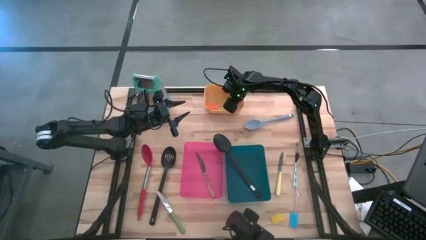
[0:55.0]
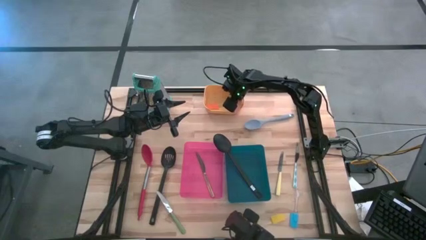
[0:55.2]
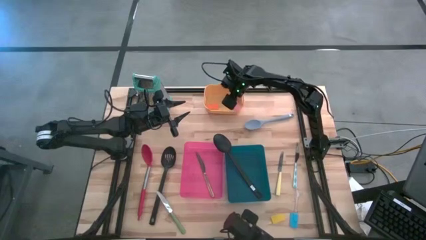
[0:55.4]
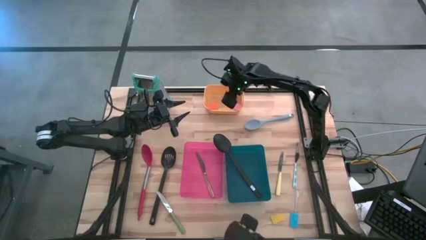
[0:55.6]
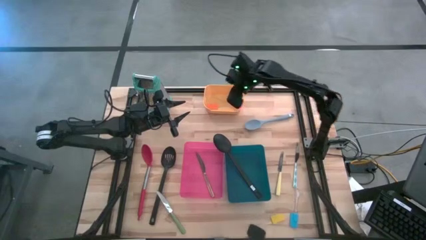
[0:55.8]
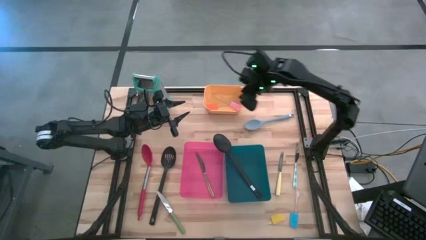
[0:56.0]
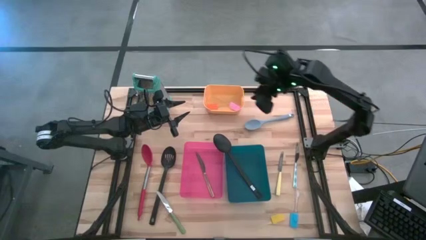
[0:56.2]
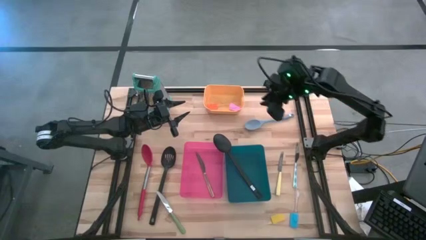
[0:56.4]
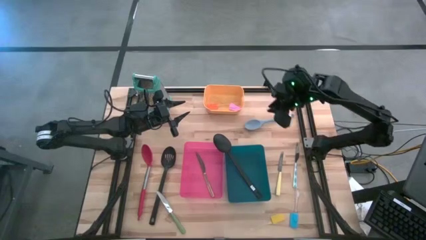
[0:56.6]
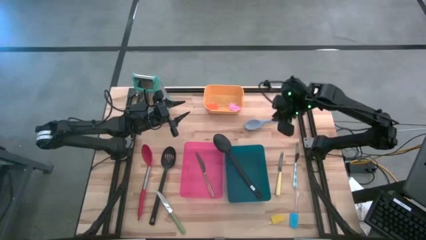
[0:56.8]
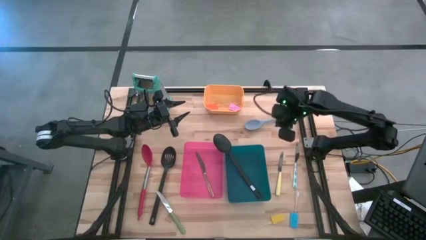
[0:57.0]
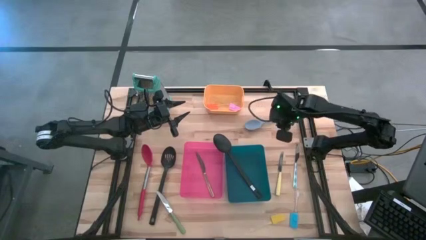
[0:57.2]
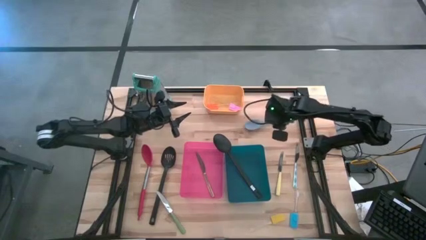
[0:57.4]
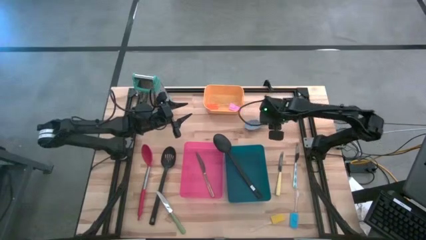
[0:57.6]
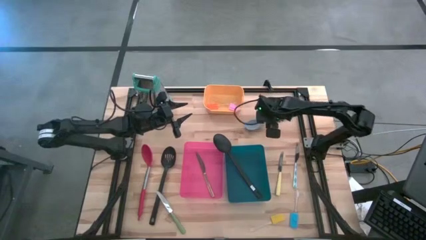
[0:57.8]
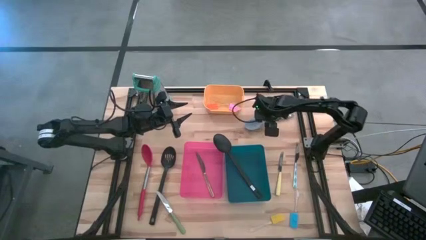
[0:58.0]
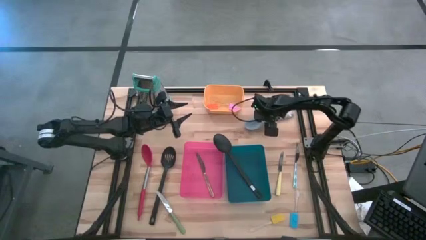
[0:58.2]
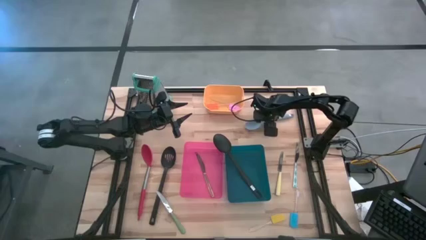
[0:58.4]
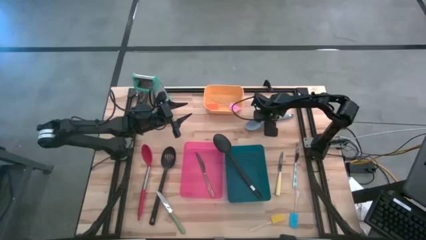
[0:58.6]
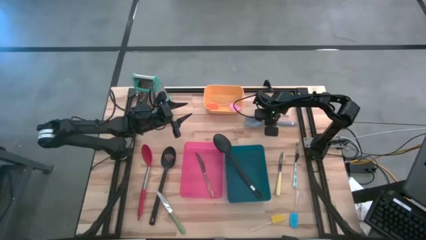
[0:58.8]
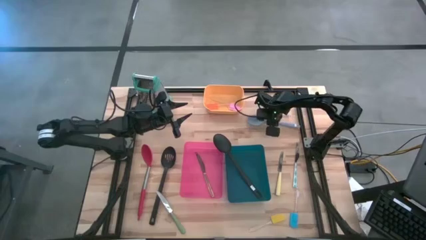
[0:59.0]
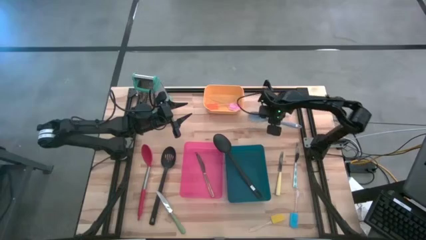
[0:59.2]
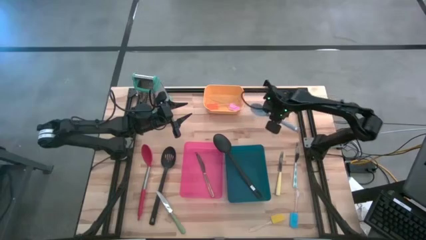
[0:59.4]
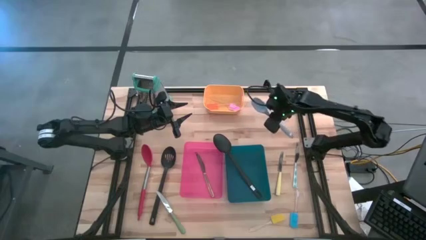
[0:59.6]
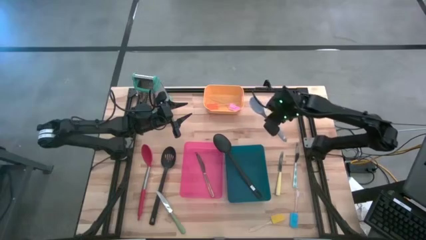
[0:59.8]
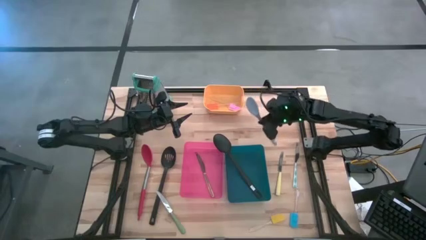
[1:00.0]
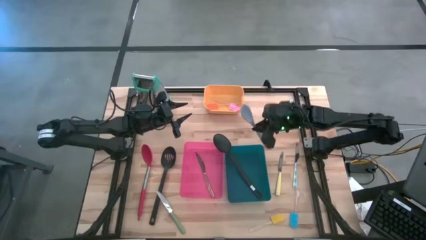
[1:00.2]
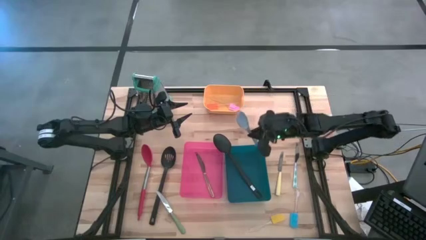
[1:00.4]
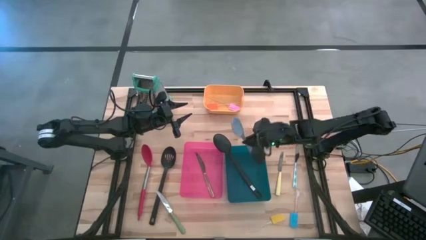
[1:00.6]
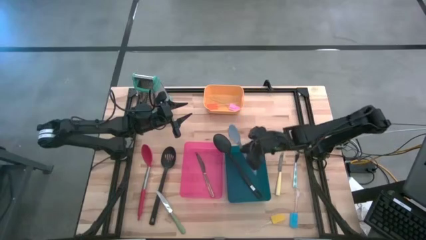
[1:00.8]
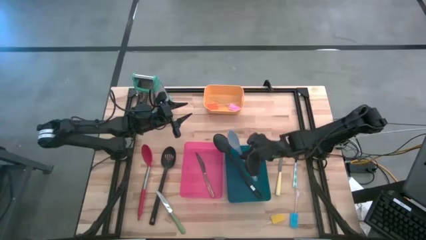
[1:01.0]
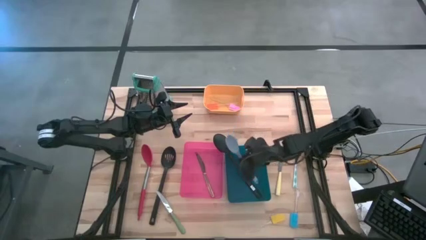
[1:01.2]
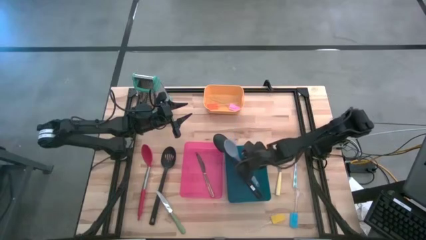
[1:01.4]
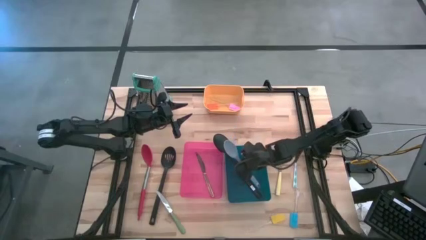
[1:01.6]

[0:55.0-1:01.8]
Task: Pick & Place Kitchen Items
Put the gray spoon into the blue bin

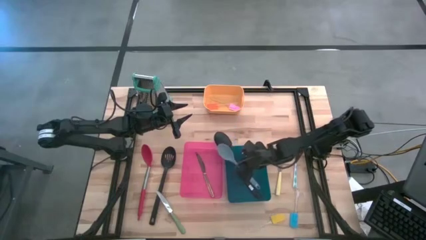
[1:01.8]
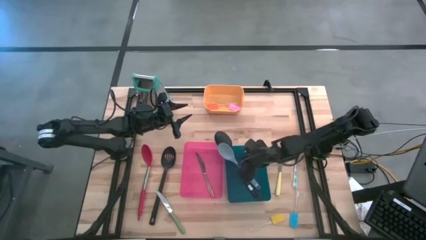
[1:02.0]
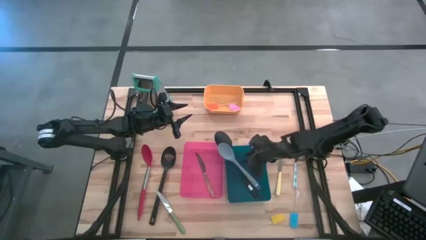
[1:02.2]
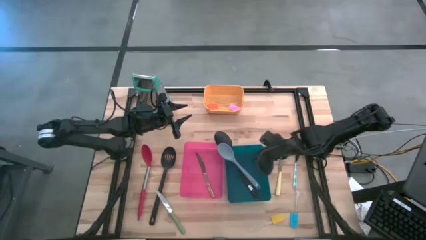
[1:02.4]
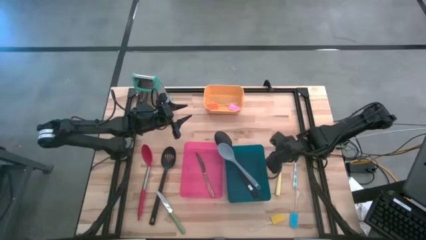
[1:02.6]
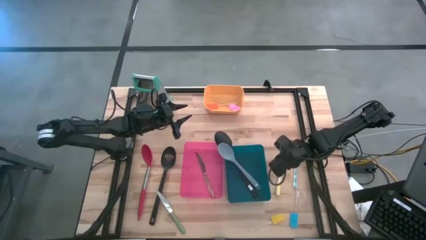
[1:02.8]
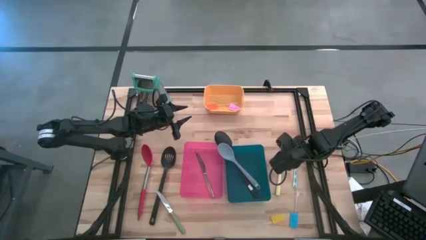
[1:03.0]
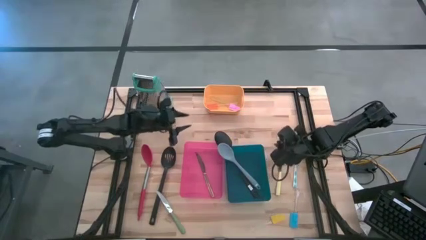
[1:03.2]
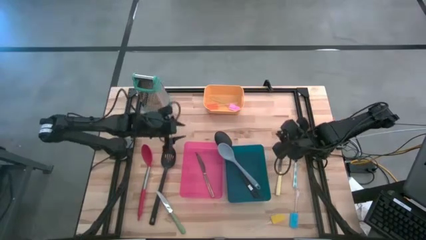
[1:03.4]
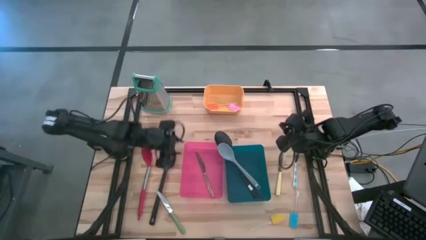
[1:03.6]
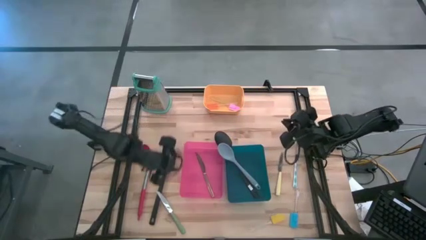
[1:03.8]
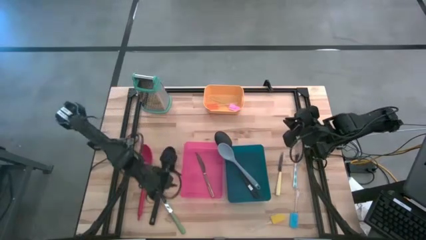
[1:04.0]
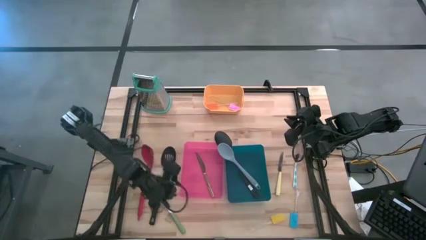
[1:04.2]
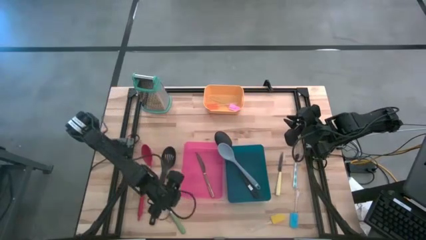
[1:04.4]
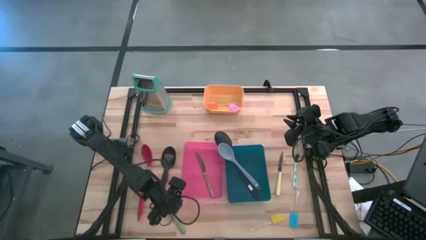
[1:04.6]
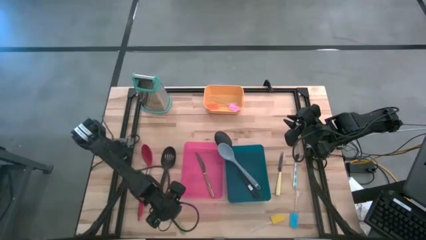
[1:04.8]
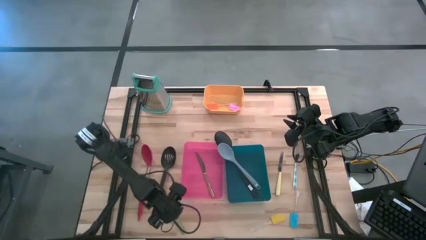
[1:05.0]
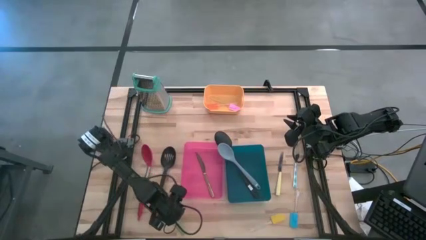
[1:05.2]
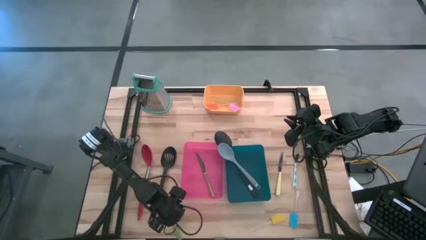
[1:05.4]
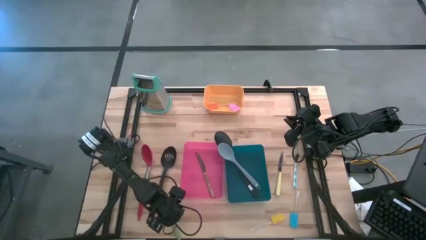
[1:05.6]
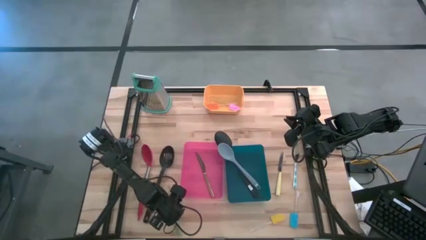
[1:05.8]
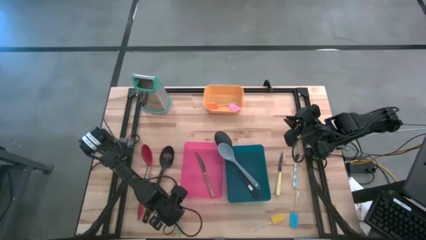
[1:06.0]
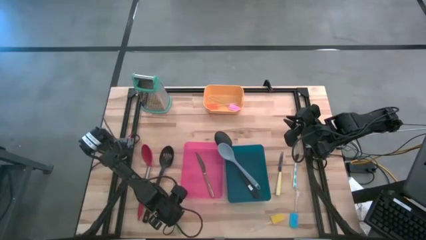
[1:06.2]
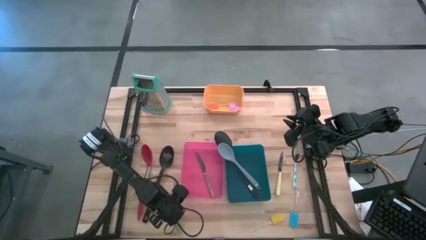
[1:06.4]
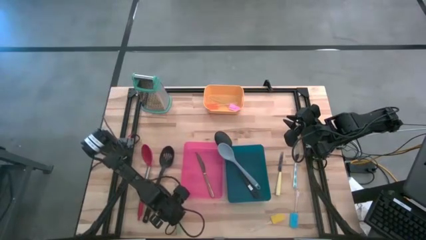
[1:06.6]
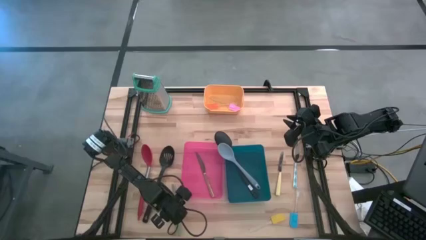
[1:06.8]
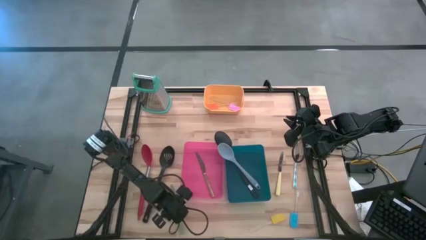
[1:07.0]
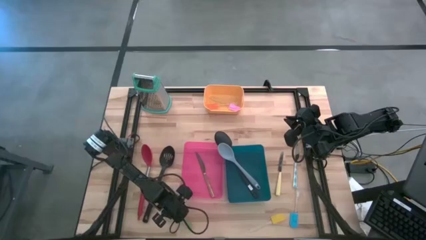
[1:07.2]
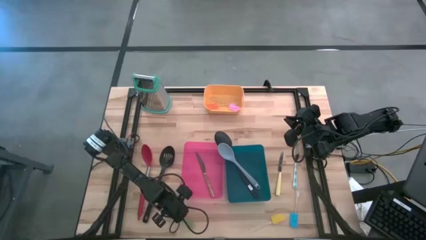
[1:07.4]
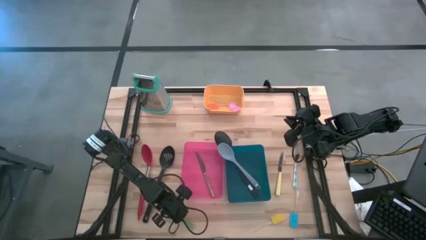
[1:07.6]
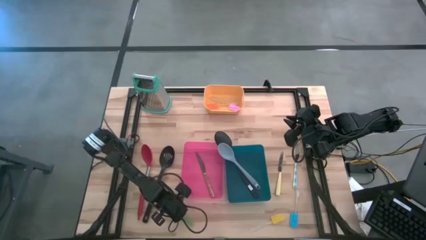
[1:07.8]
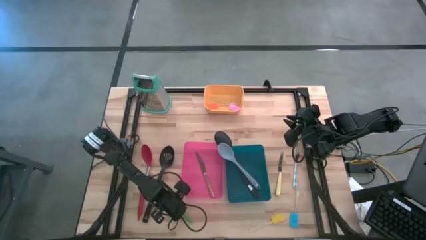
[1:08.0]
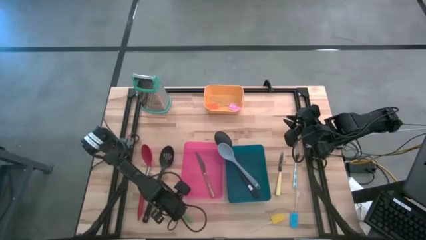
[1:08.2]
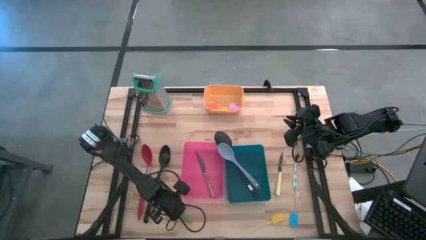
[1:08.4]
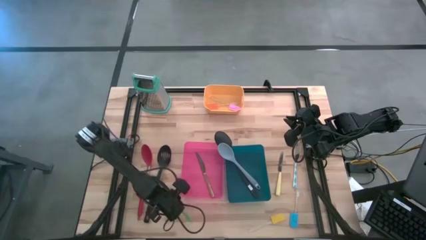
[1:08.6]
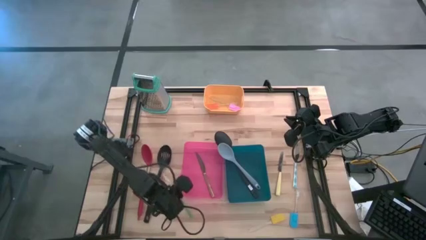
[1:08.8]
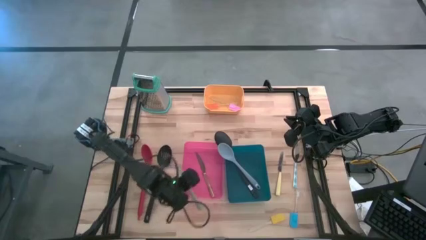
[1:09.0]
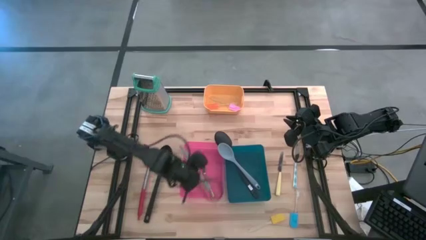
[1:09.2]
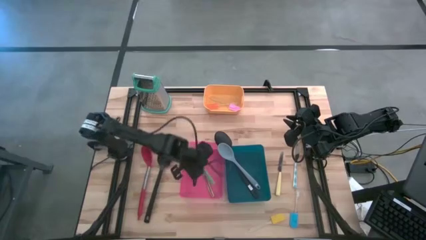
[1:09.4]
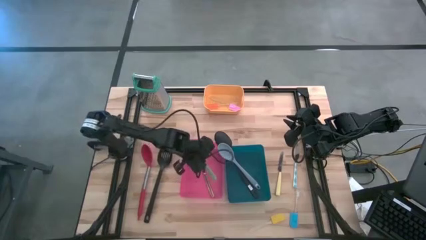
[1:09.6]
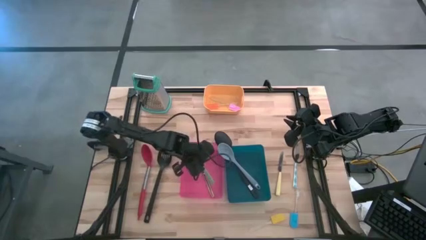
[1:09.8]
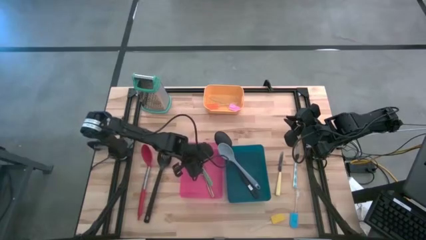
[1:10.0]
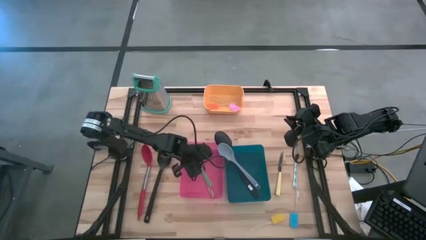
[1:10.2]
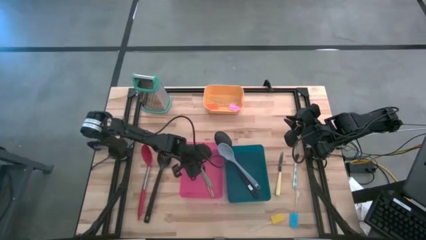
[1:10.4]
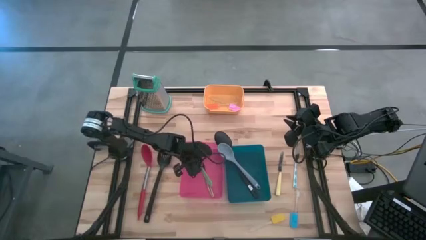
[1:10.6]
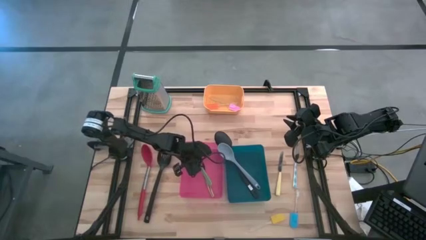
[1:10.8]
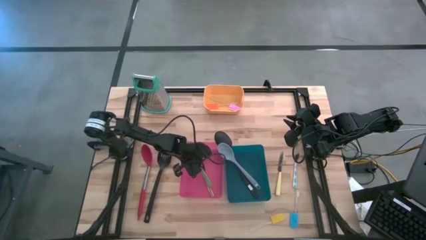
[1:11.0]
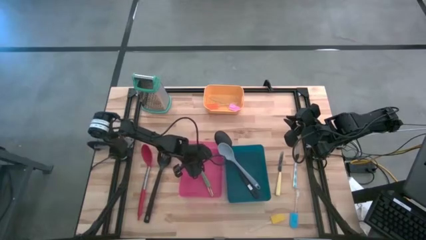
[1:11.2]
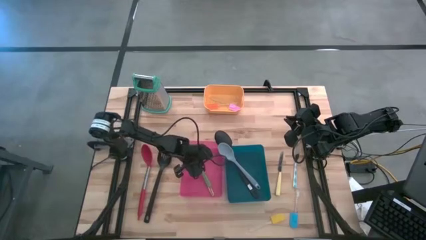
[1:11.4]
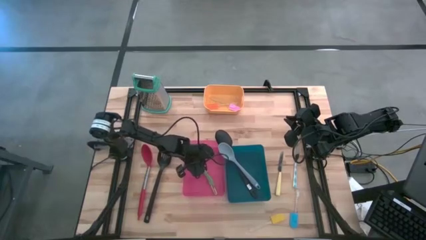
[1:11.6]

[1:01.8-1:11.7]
Put the green knife into the red bin
